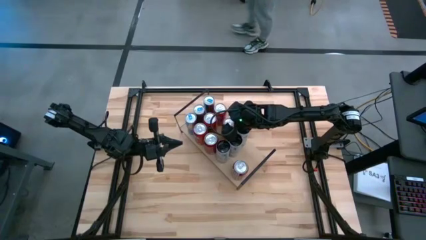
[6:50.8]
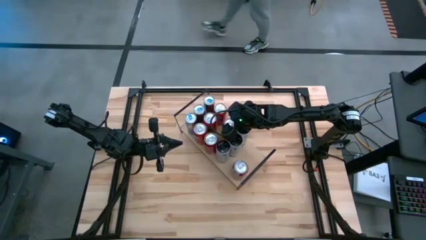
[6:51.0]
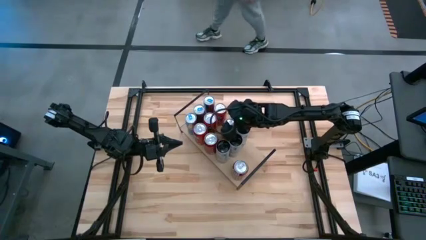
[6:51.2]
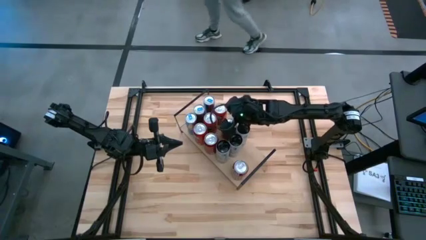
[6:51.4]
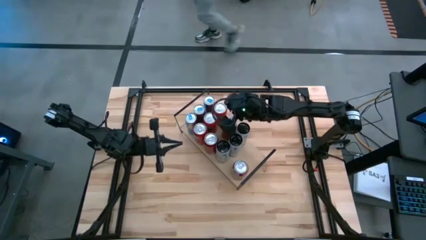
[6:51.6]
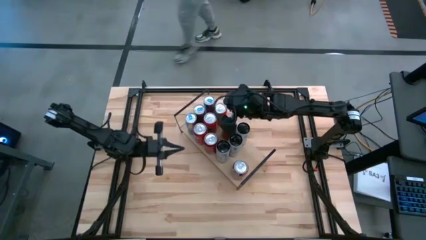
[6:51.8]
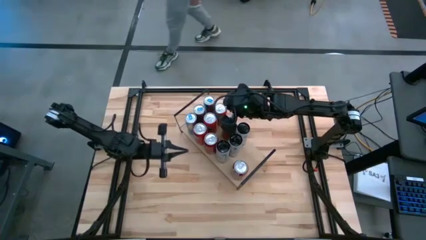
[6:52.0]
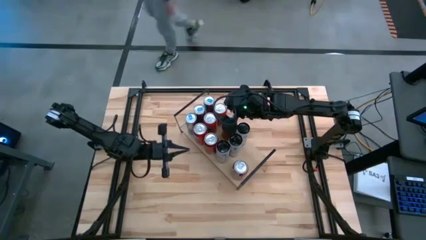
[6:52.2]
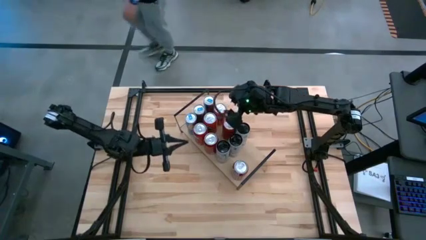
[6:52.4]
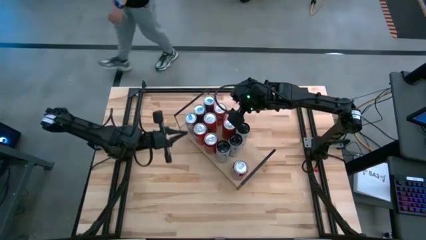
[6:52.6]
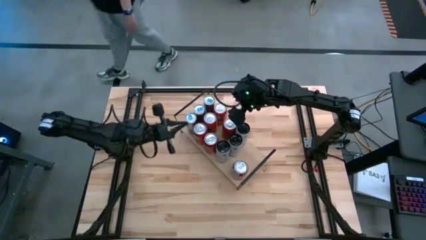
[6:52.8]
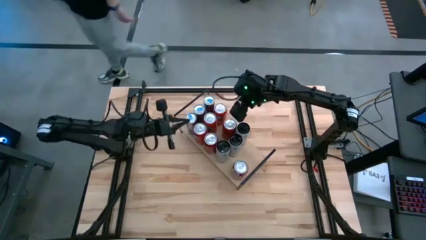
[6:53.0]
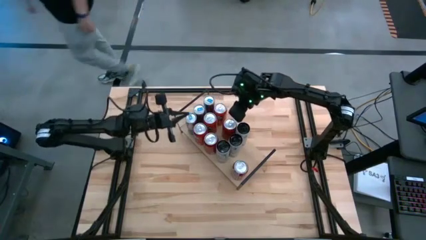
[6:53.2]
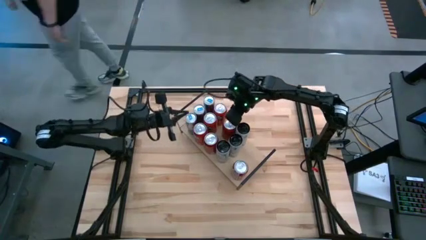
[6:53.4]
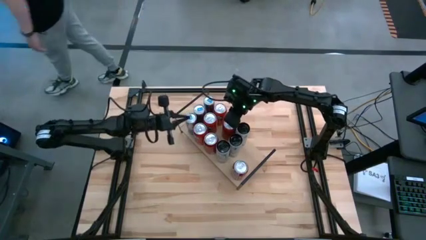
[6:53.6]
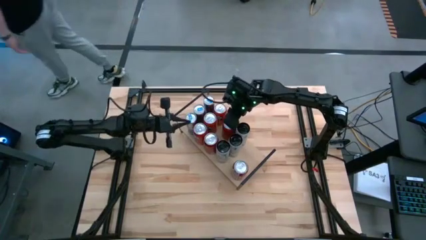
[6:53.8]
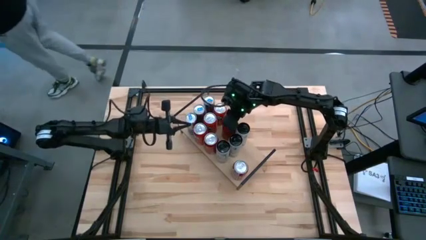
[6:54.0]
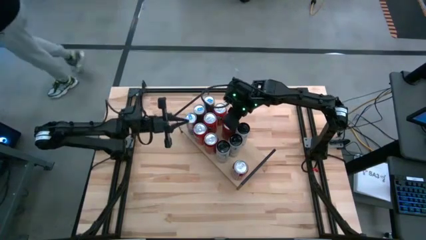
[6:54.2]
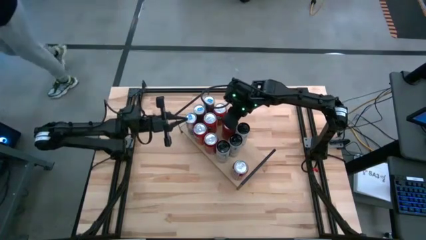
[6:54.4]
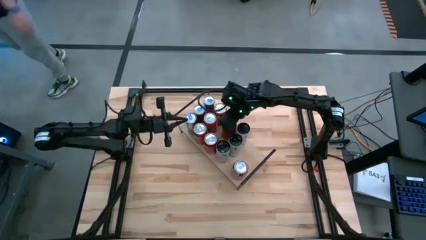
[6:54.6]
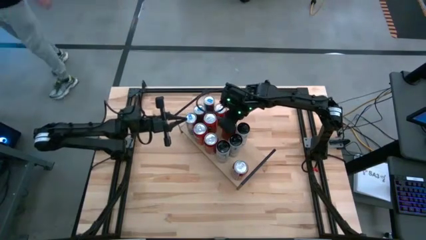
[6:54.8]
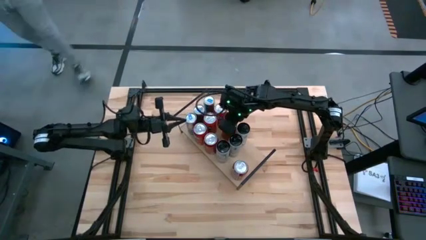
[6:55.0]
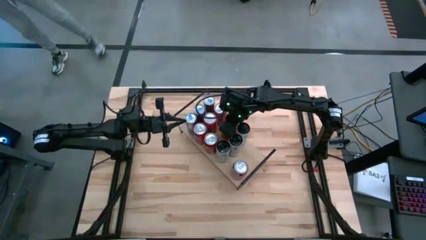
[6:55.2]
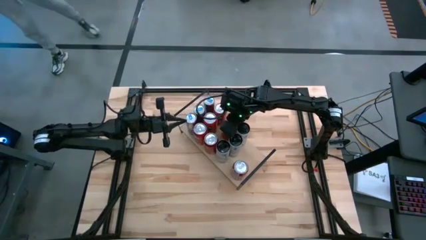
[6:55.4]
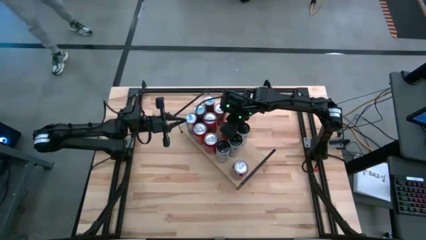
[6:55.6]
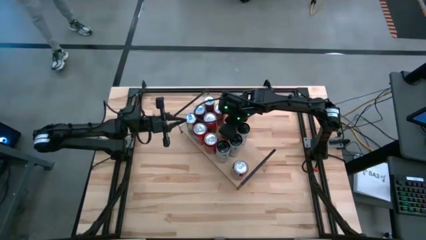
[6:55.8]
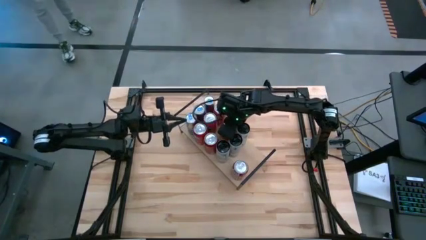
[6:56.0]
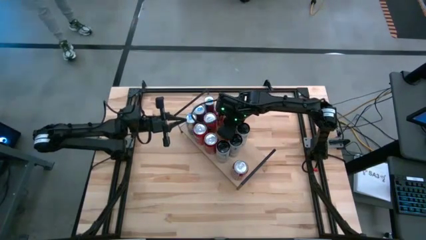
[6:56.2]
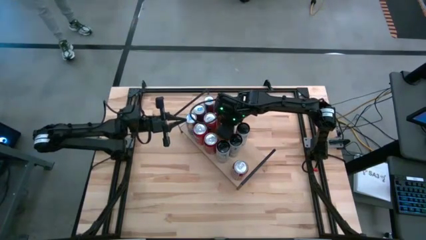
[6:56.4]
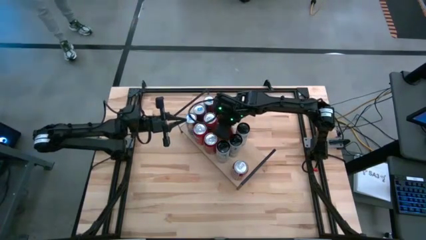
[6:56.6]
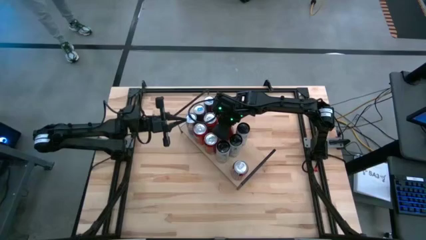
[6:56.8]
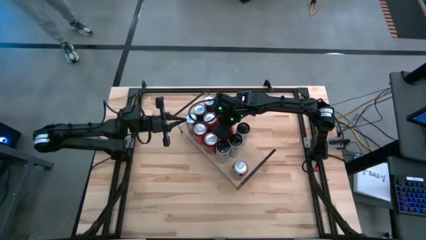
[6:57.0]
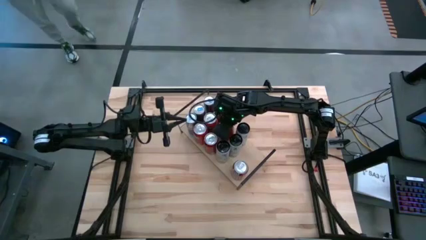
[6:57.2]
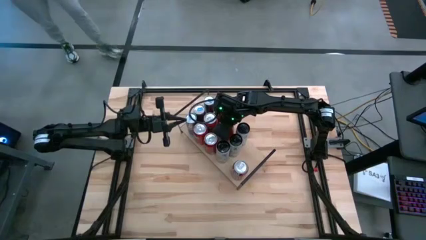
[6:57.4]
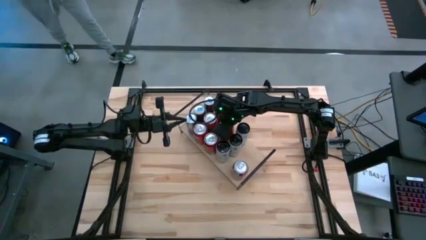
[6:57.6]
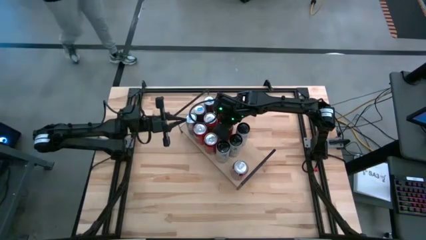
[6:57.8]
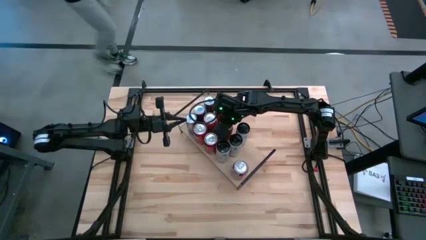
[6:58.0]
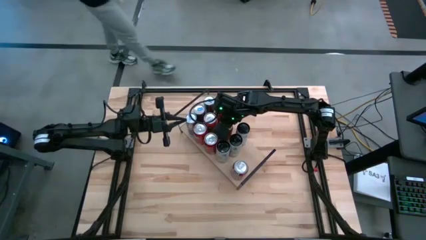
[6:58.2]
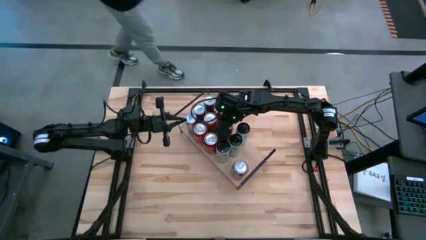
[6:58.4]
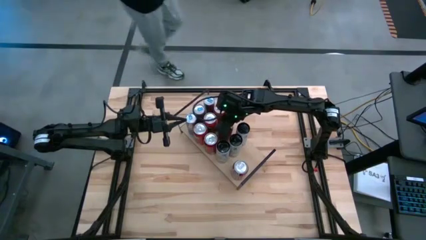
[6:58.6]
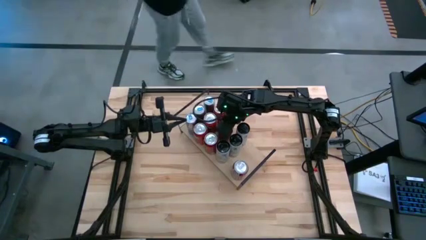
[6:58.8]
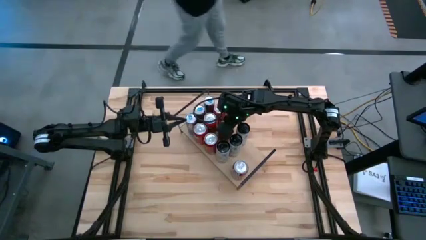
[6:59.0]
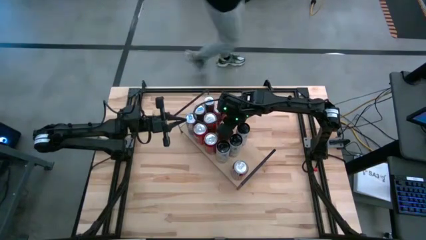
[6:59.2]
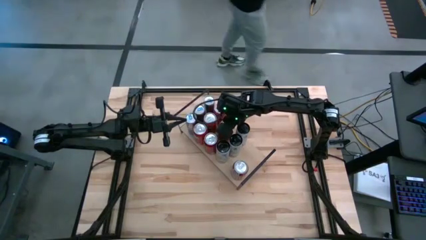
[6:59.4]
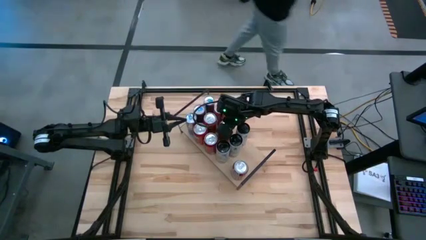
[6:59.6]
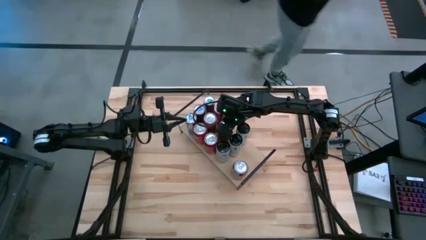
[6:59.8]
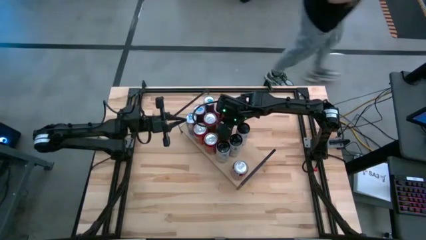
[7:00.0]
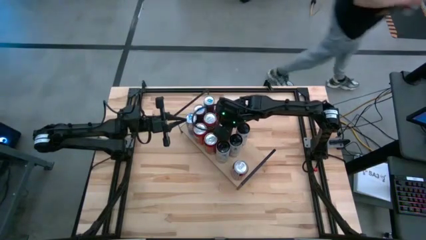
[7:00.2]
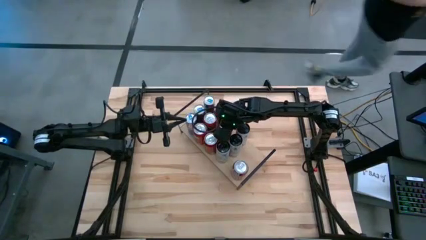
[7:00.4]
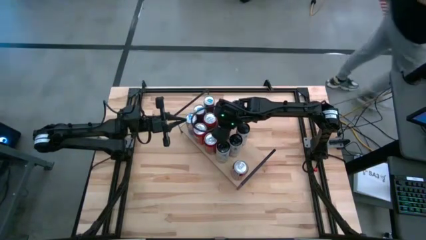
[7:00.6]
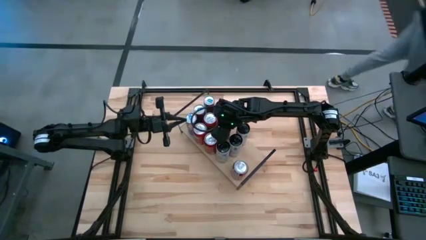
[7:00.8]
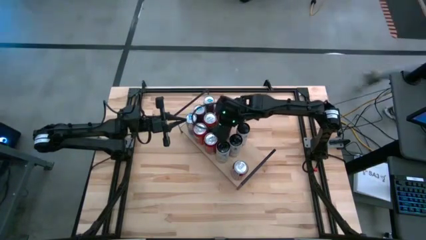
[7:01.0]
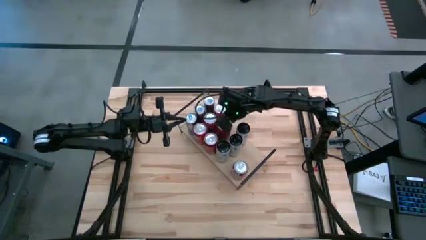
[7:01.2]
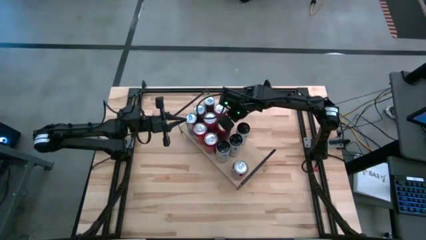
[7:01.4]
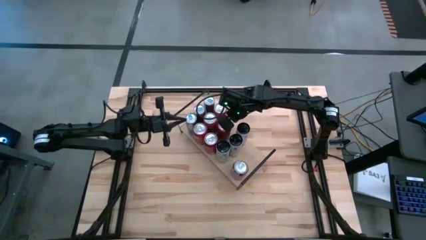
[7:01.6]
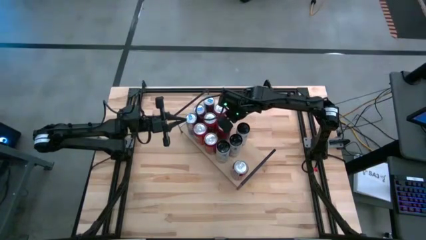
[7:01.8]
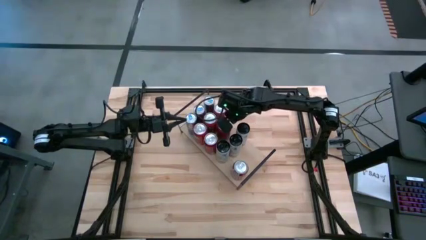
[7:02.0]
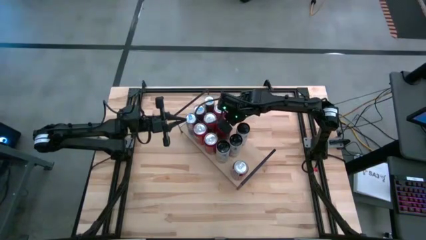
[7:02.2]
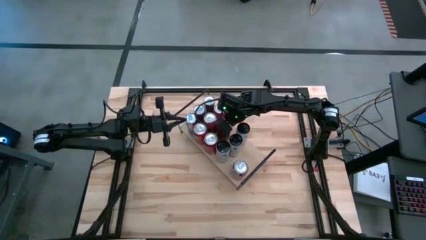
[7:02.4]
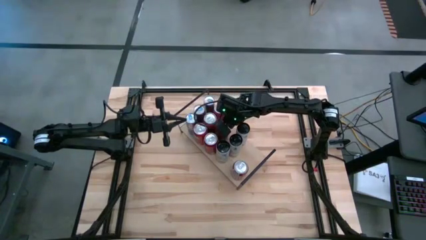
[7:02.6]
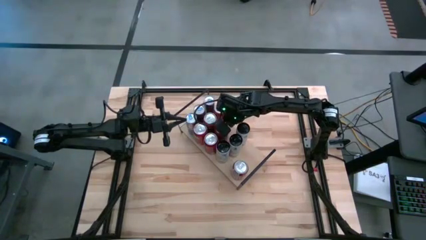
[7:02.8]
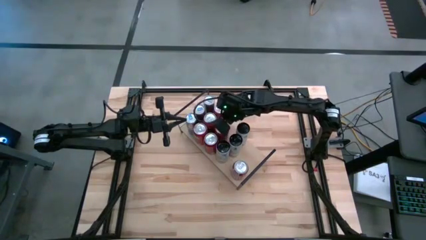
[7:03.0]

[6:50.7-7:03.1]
Task: Place canned beverage on shelf
Put the red soda can on the shelf aligned with the red soda can on the shelf

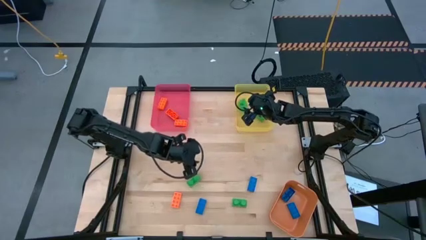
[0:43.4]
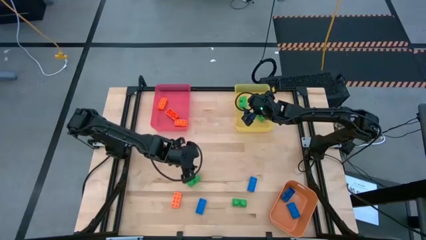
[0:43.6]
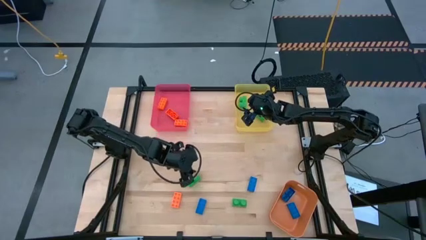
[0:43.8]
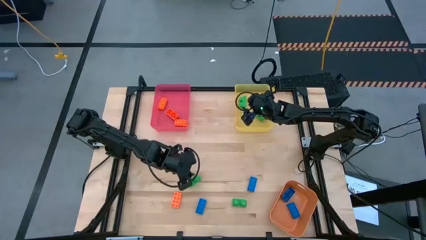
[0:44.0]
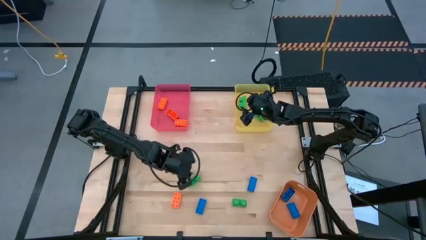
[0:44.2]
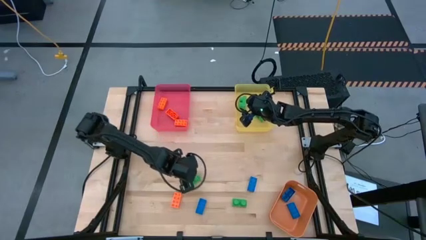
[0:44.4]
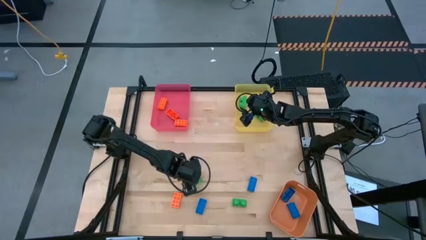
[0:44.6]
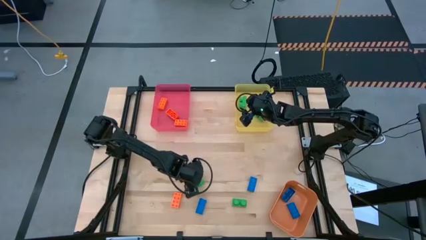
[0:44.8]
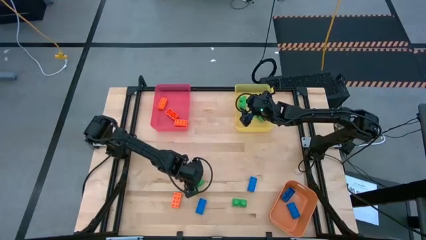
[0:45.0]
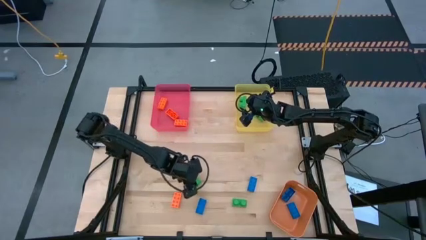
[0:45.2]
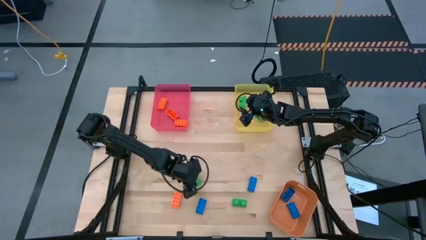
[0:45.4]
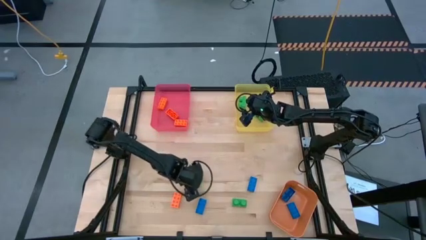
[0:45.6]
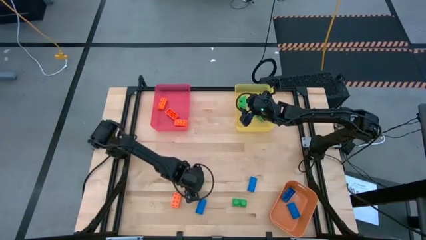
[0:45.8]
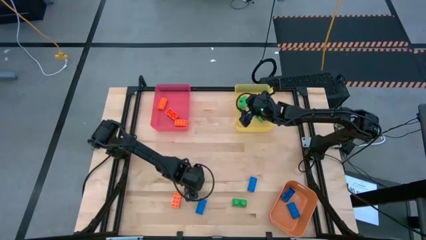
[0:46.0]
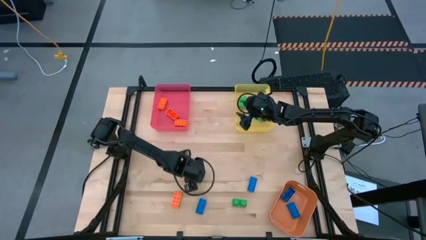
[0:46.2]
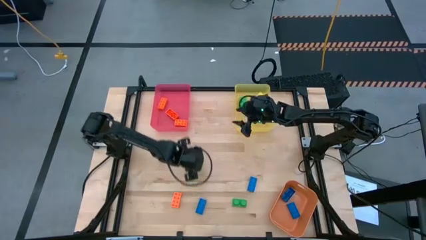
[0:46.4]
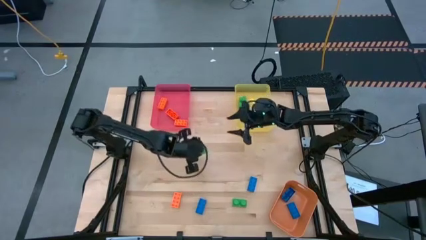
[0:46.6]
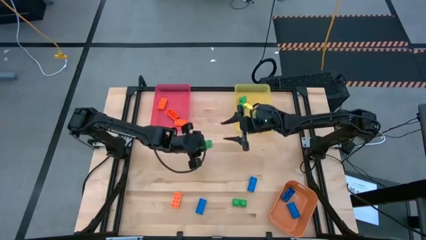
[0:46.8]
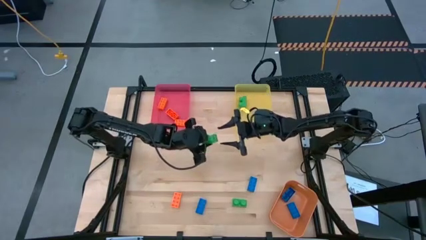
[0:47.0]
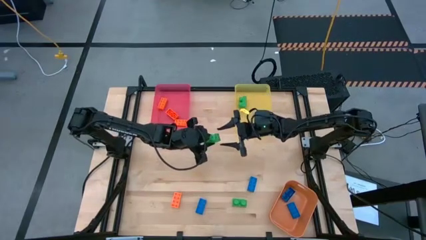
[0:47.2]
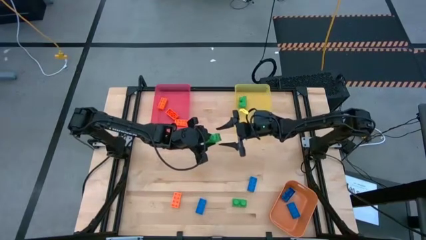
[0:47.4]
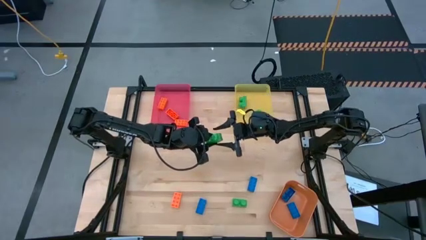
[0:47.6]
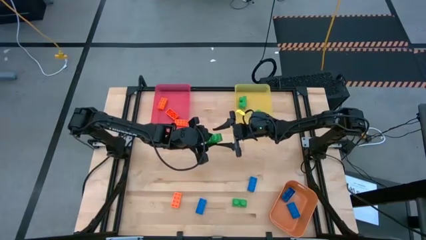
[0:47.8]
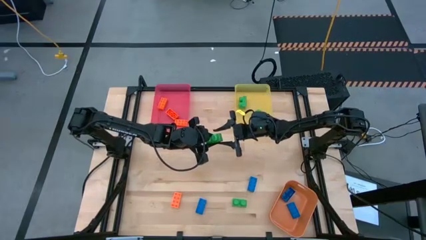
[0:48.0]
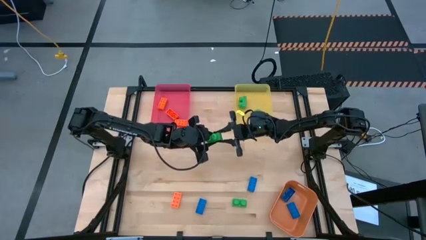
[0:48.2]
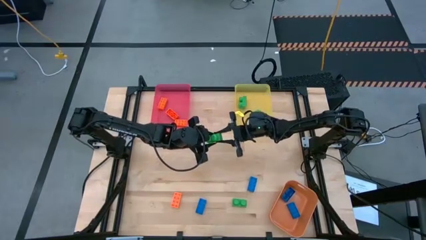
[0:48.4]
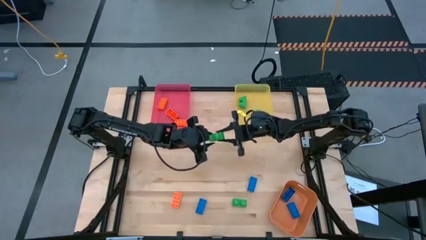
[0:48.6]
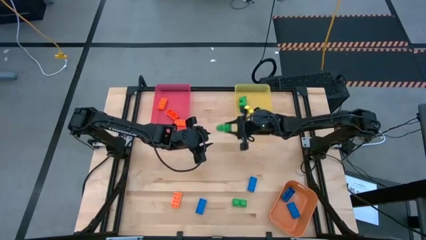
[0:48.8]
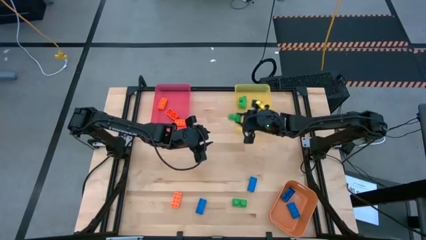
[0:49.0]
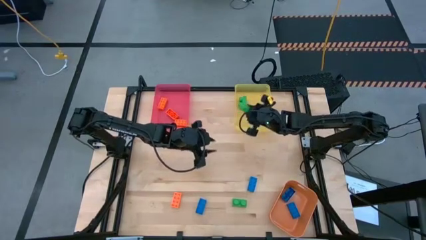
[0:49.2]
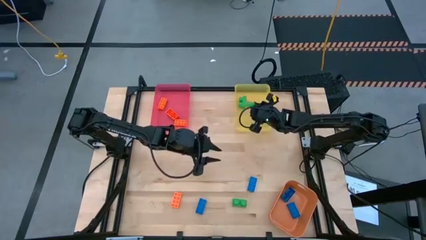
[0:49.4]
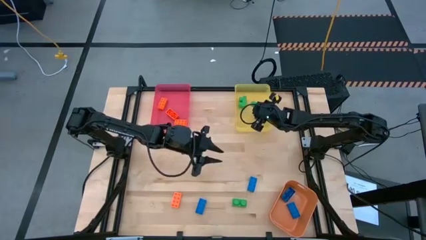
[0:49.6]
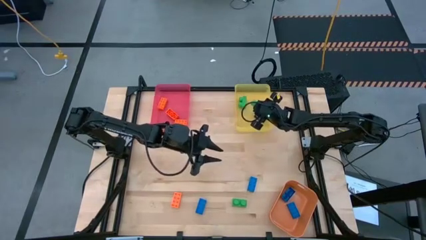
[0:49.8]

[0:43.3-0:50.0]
Task: Sort & place blocks by color
Put the left green game piece into the yellow bin
